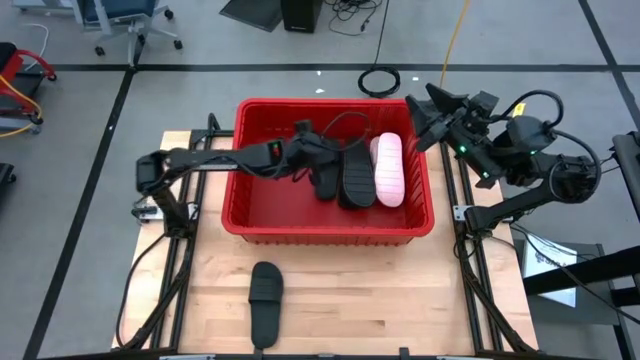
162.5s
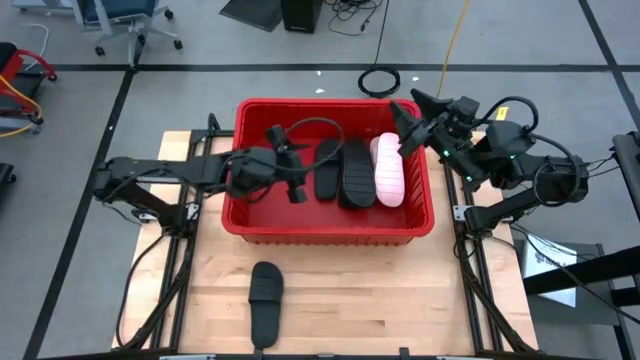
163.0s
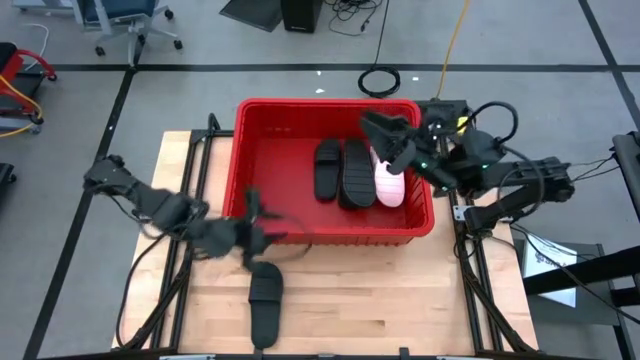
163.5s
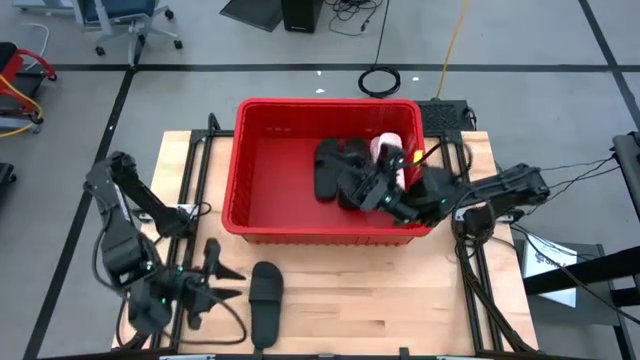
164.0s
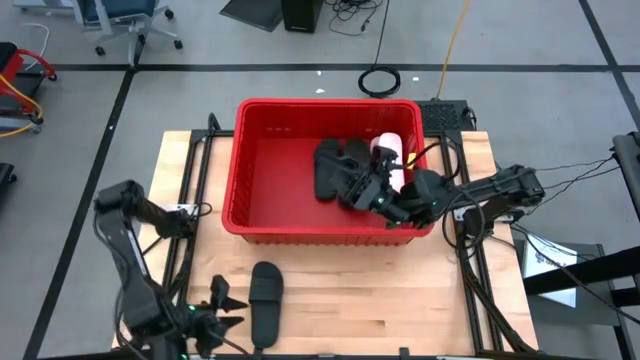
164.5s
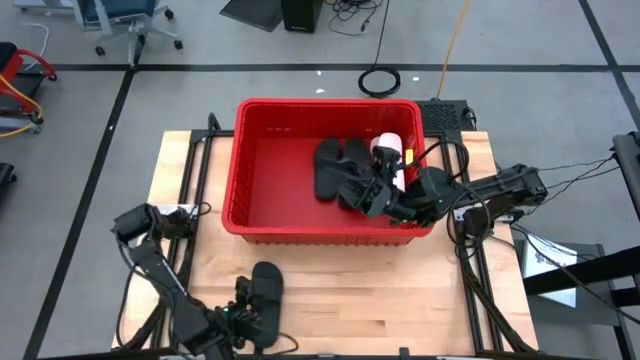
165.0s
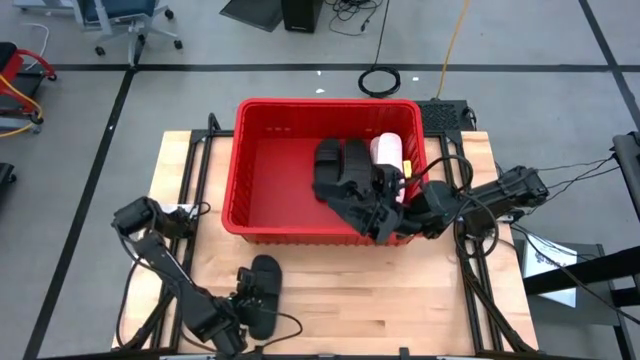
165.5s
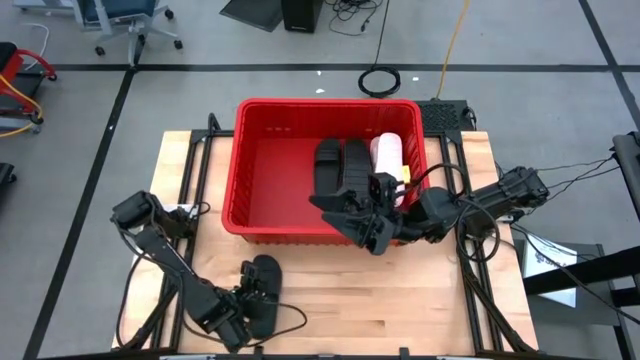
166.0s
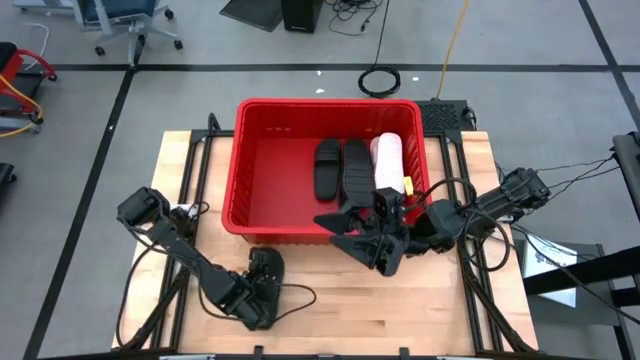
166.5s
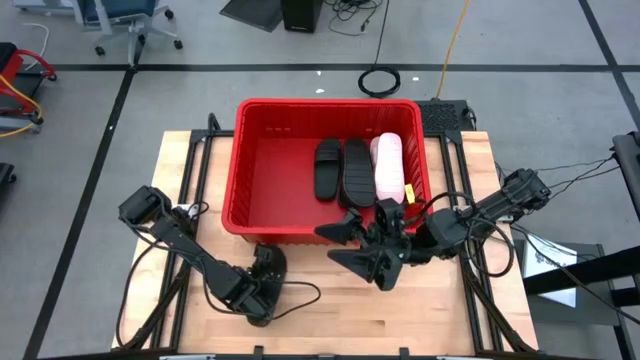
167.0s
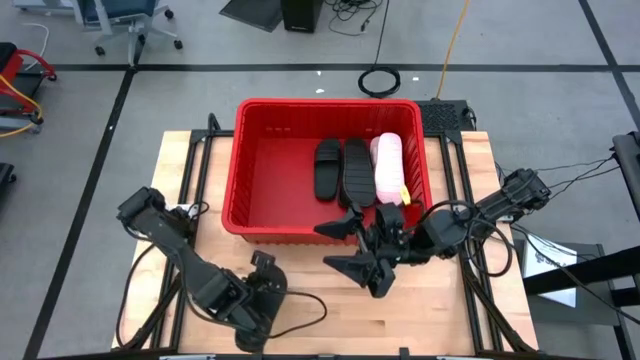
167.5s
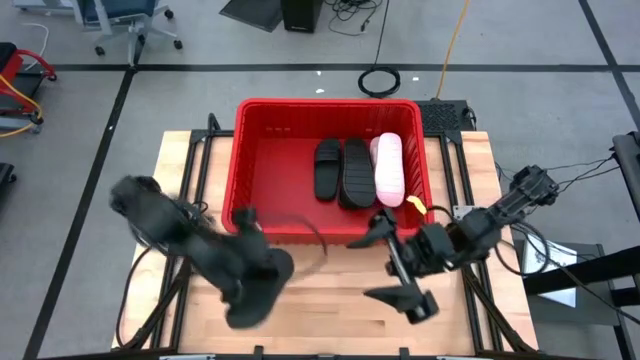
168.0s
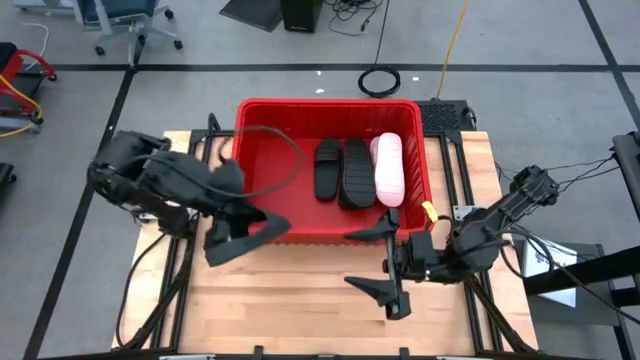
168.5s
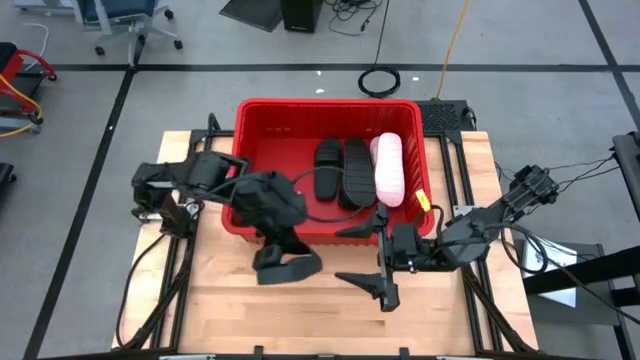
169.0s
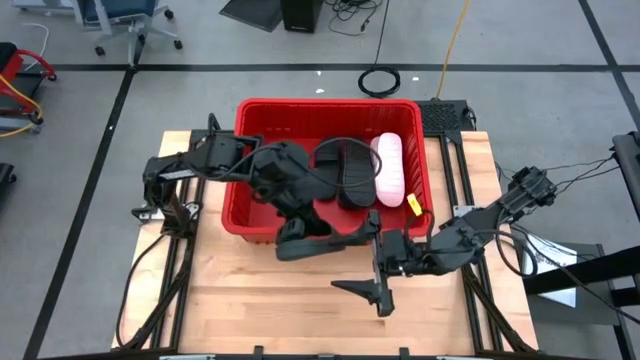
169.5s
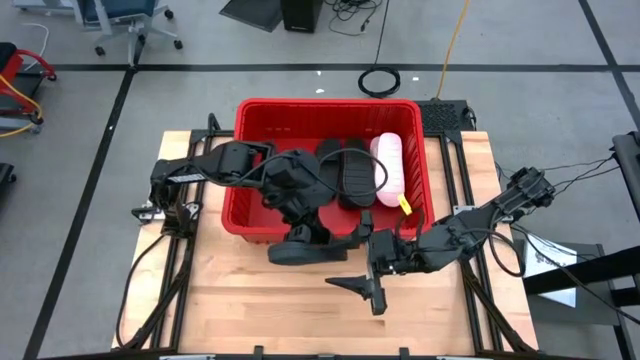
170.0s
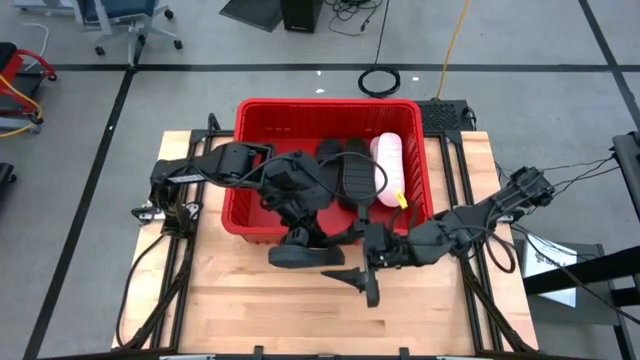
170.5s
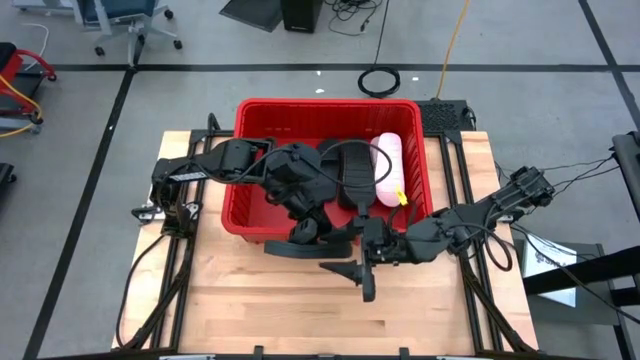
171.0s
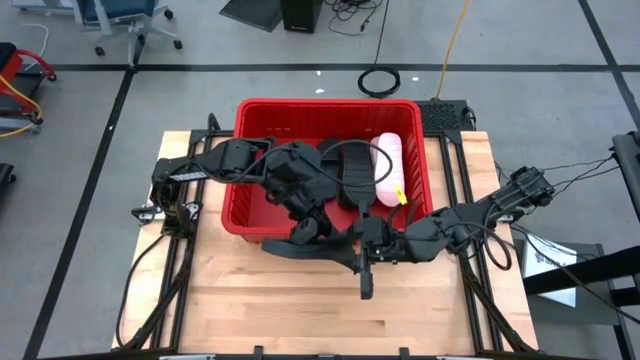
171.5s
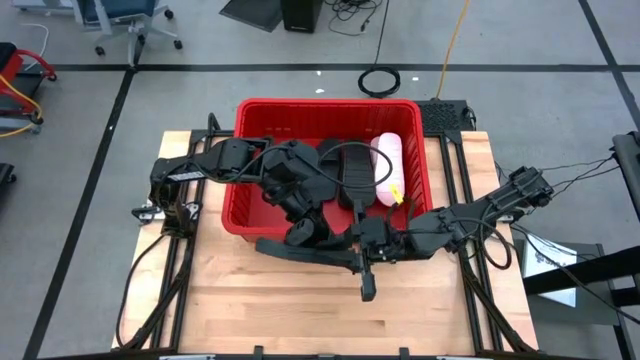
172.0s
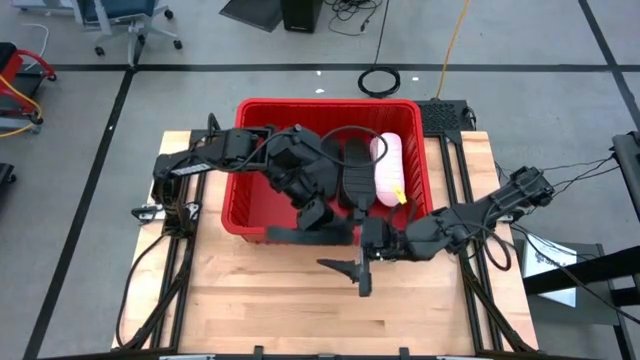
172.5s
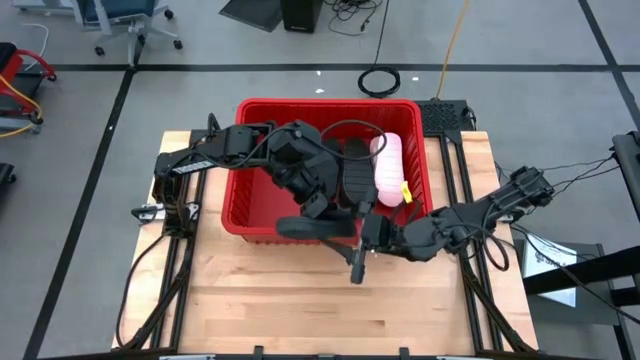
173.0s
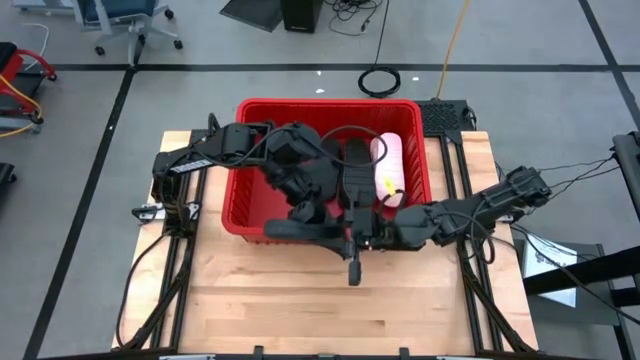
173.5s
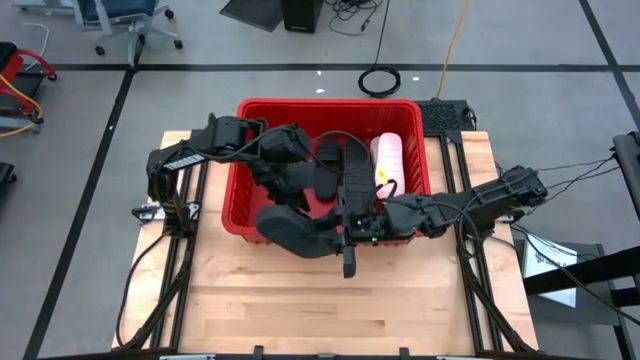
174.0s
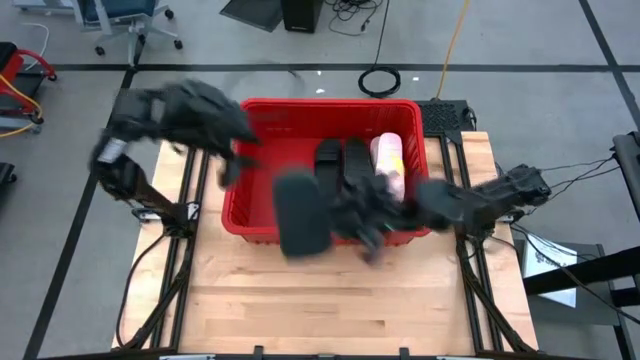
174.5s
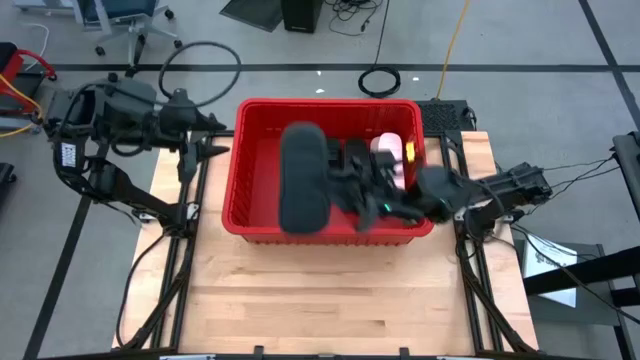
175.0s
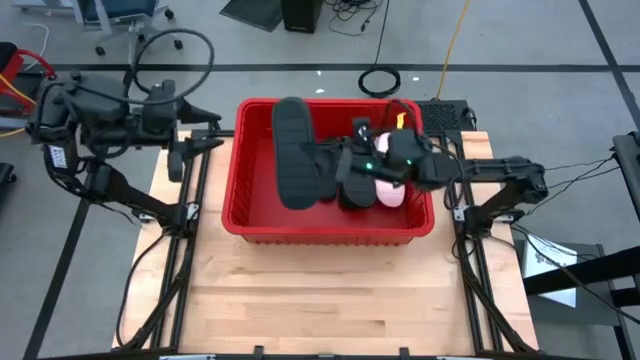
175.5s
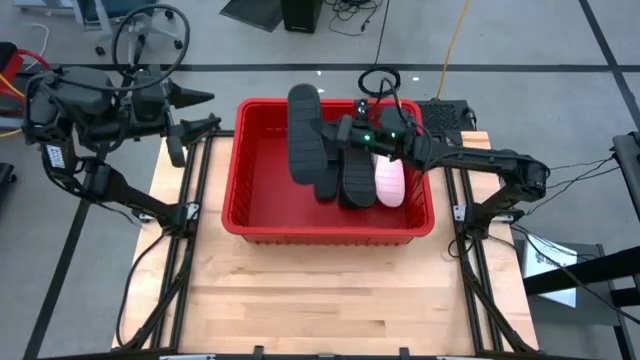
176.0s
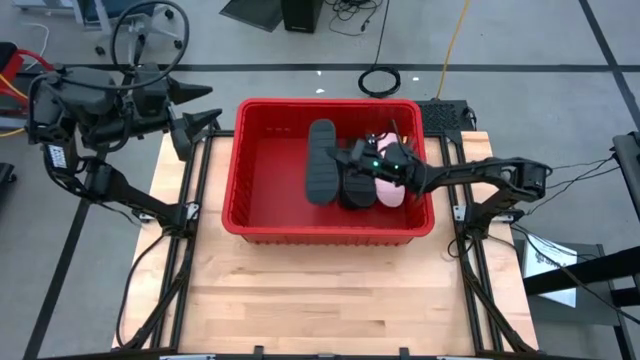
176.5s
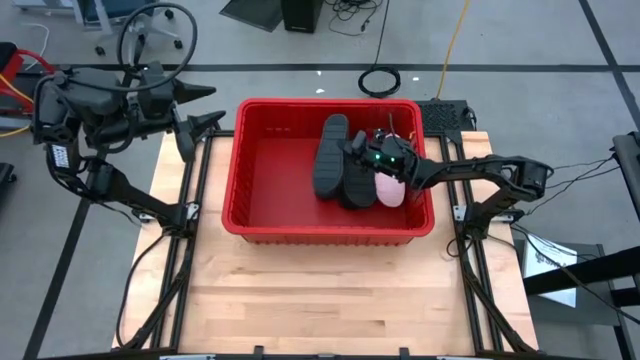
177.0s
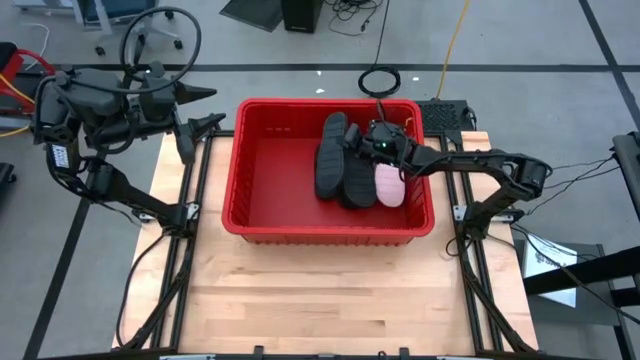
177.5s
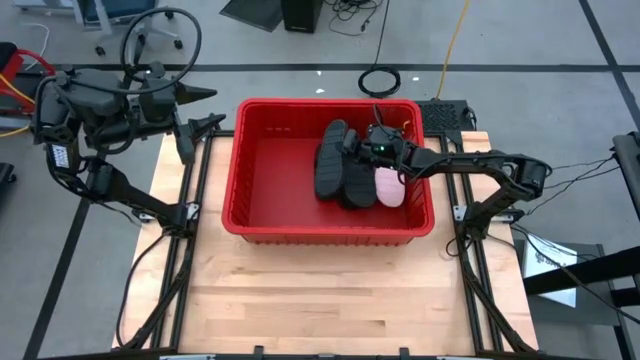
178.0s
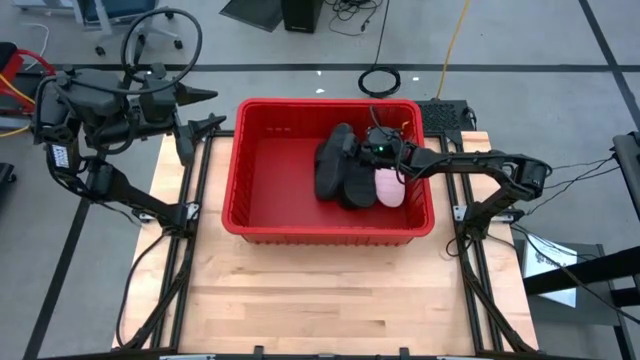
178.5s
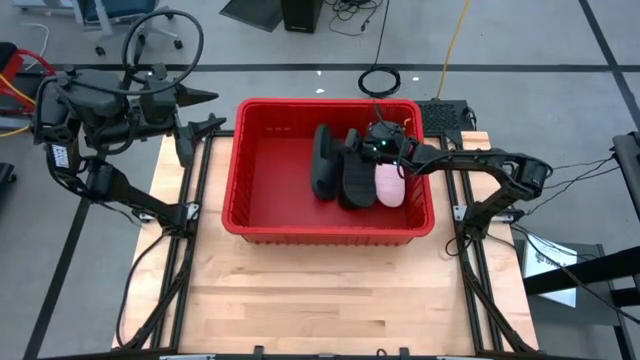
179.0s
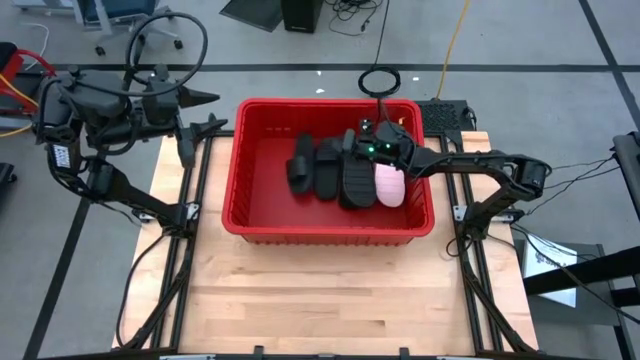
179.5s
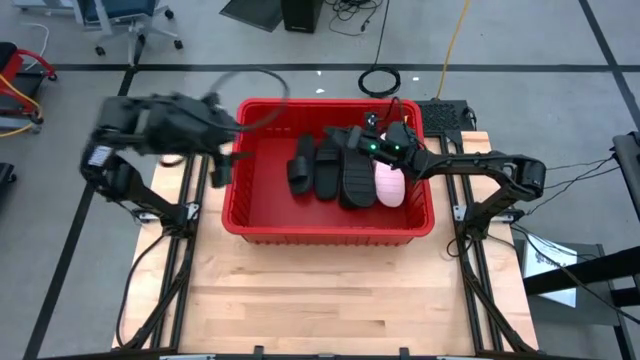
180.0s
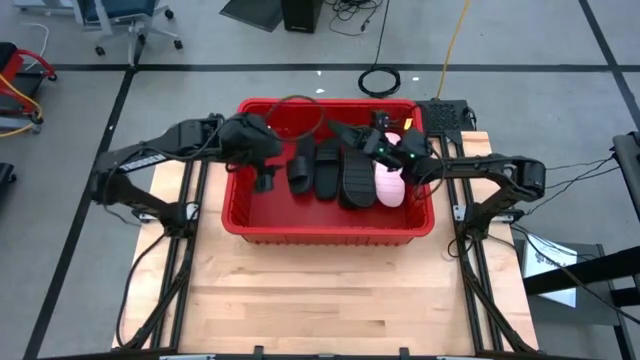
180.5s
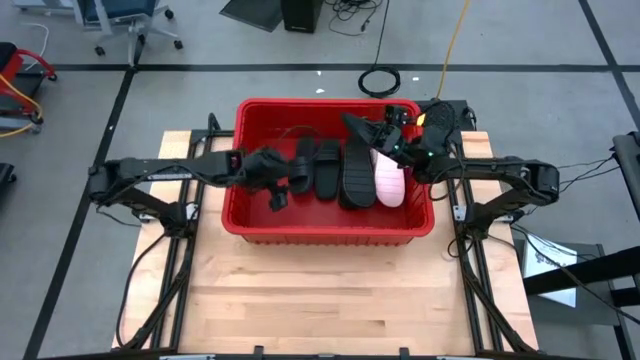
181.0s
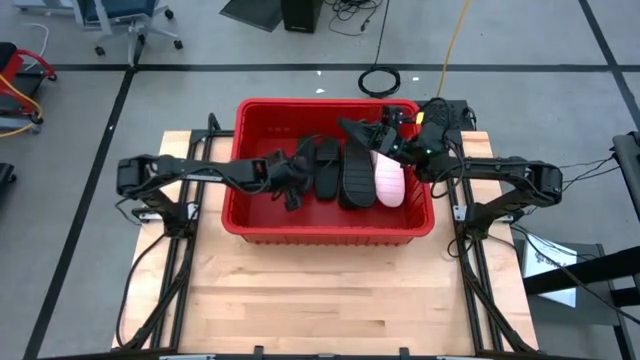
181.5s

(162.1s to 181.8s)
Task: Pick and place slides into bin
Stack the black slide on top of the black slide in the red bin

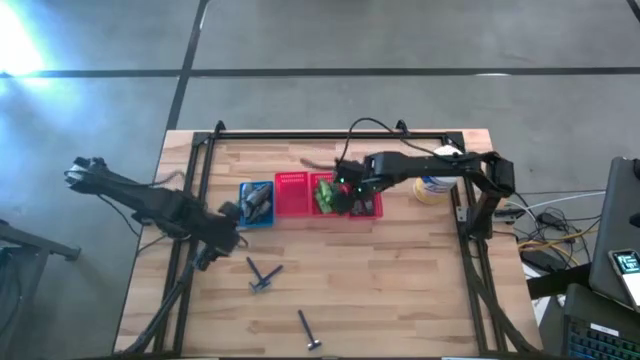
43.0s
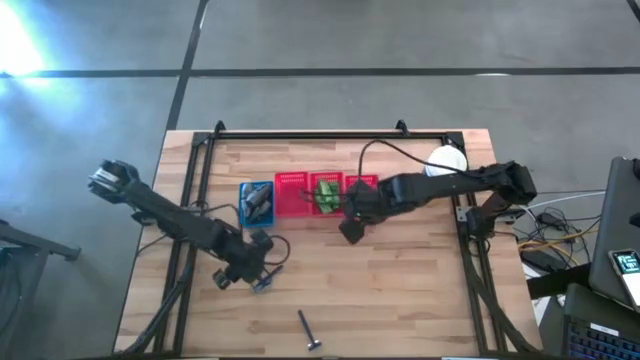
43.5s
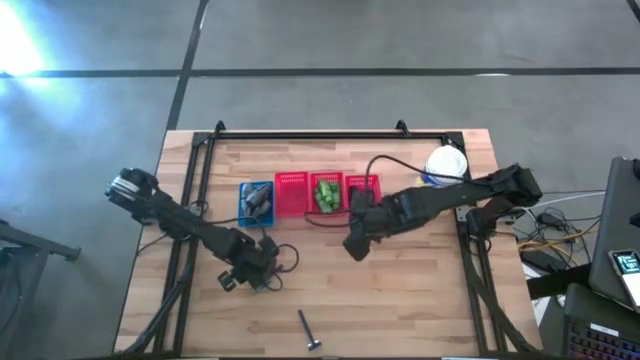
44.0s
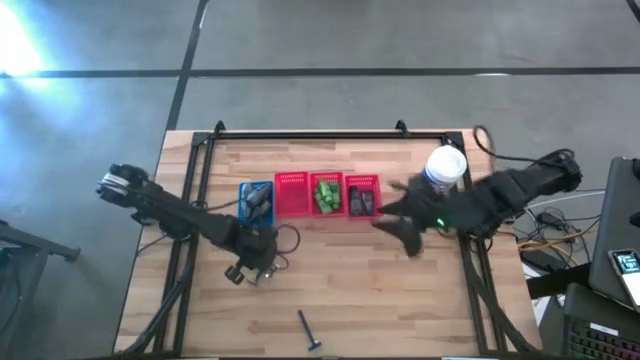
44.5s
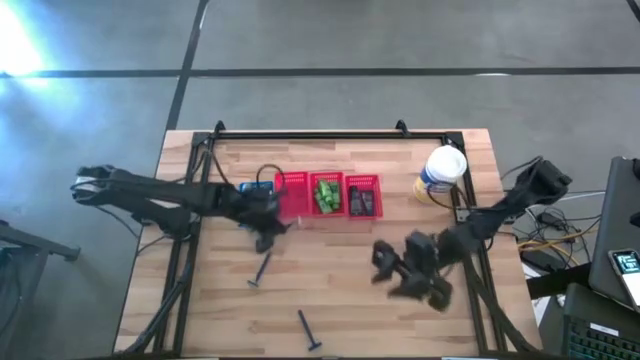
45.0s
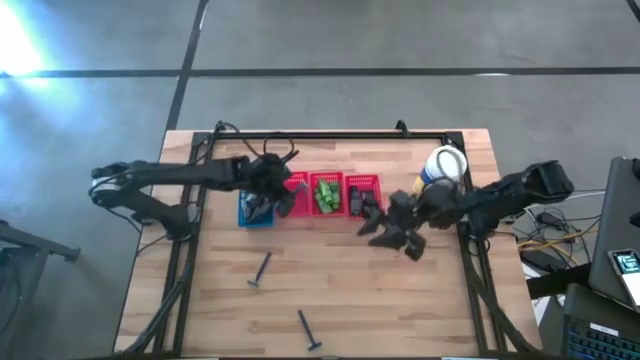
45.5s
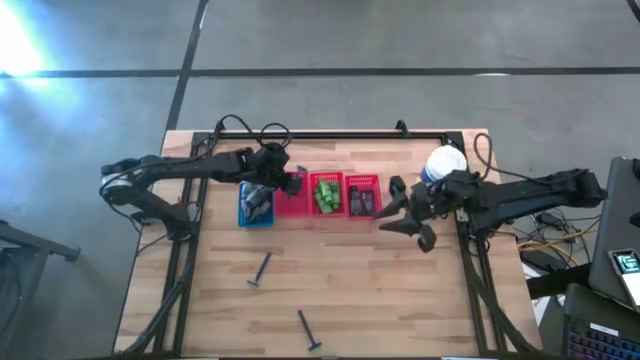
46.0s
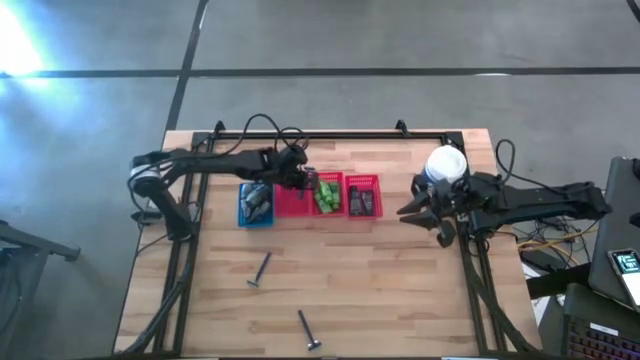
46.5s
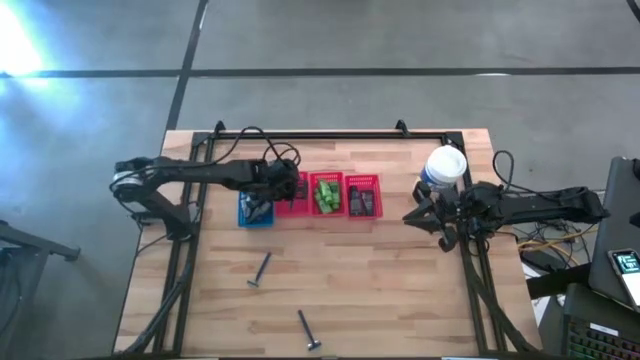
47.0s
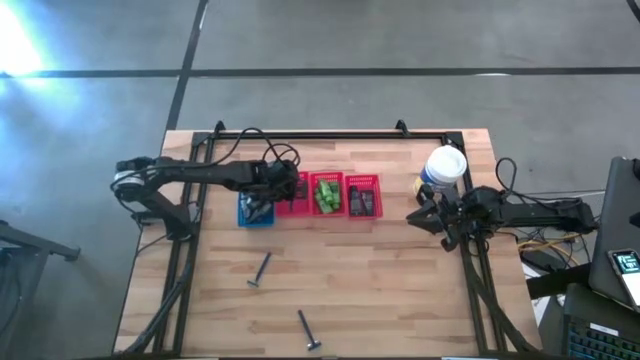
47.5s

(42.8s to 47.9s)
Task: Pick & Place Travel size toiletries
Put the blue razor into the left red bin
